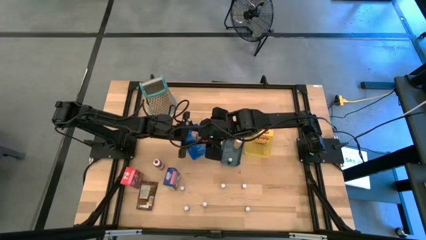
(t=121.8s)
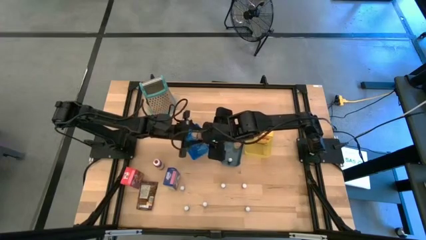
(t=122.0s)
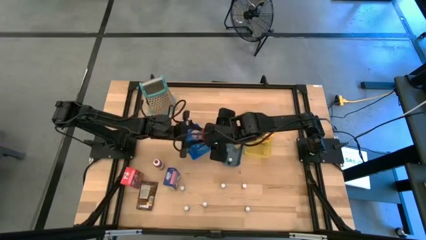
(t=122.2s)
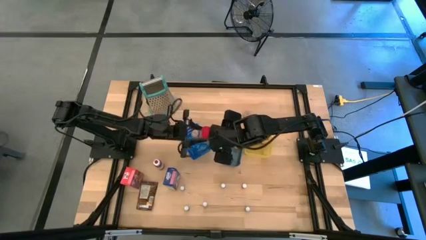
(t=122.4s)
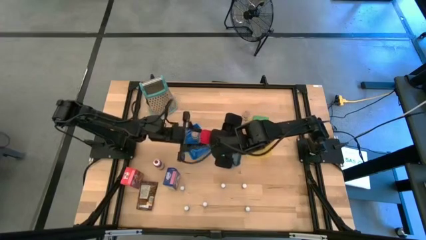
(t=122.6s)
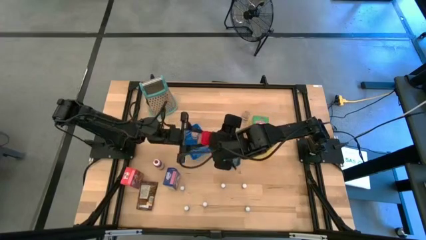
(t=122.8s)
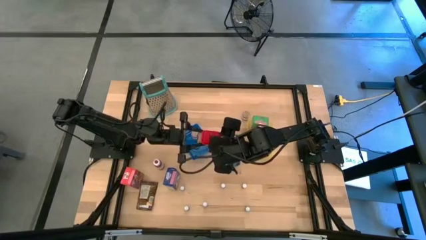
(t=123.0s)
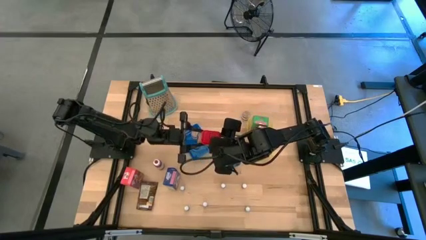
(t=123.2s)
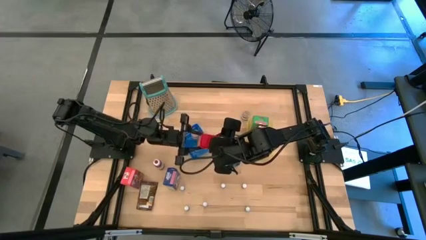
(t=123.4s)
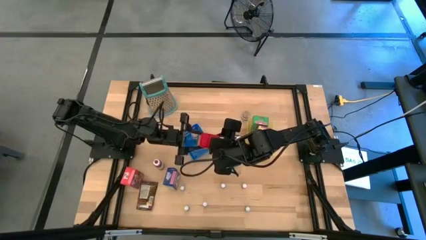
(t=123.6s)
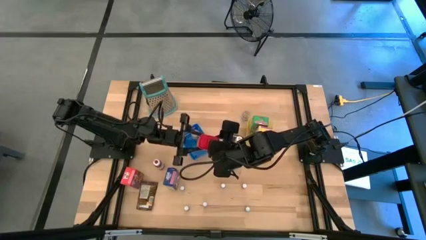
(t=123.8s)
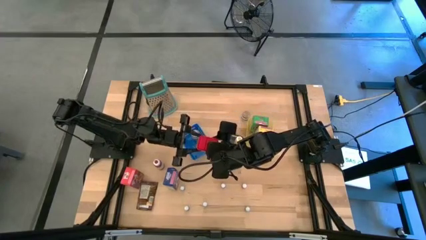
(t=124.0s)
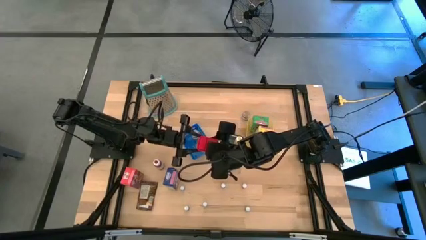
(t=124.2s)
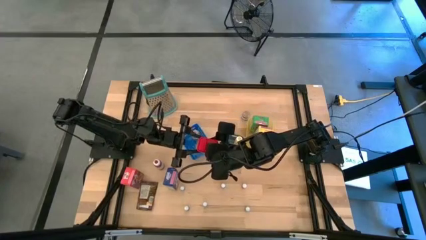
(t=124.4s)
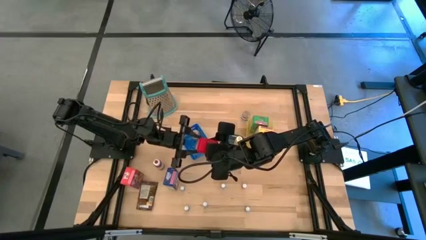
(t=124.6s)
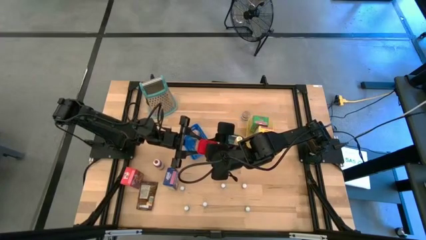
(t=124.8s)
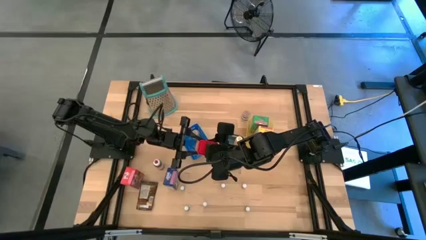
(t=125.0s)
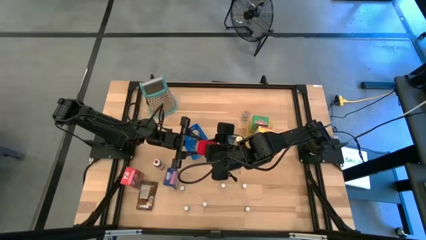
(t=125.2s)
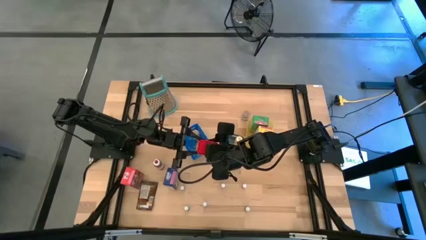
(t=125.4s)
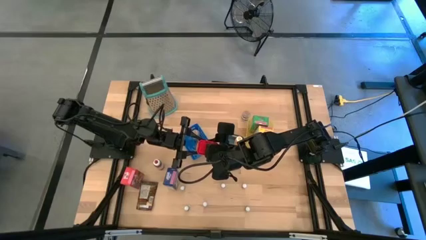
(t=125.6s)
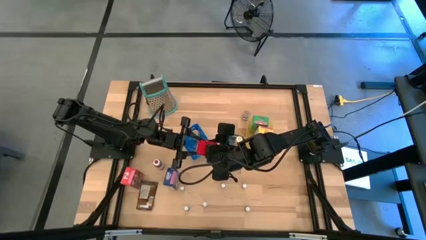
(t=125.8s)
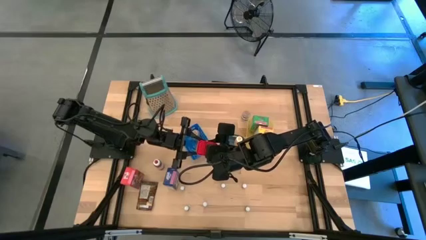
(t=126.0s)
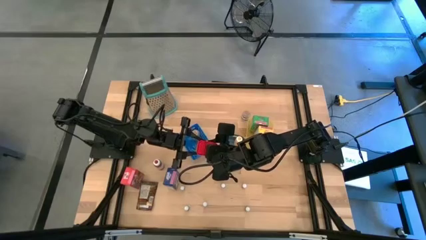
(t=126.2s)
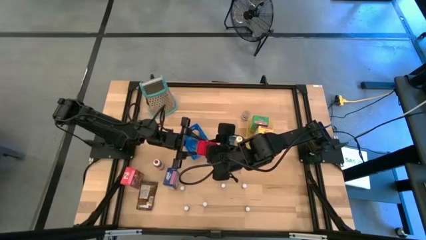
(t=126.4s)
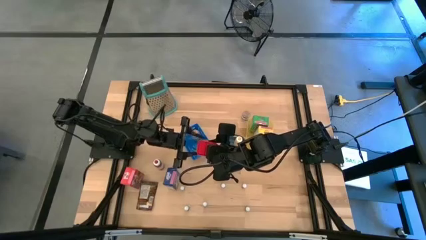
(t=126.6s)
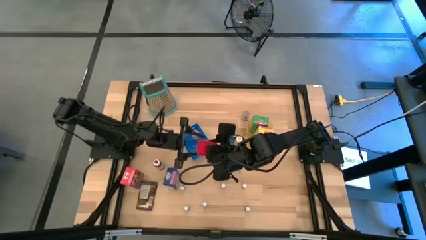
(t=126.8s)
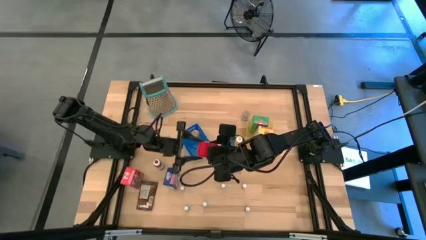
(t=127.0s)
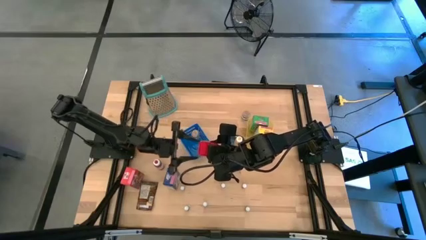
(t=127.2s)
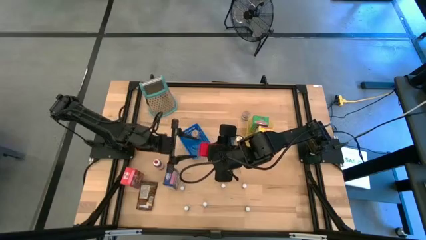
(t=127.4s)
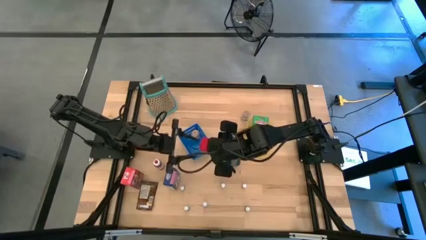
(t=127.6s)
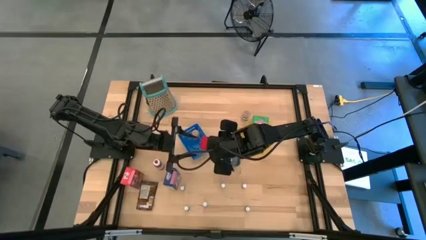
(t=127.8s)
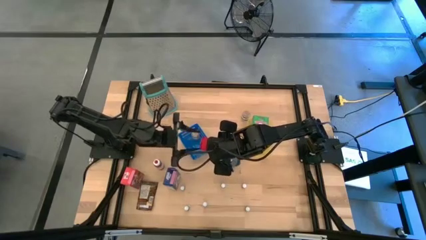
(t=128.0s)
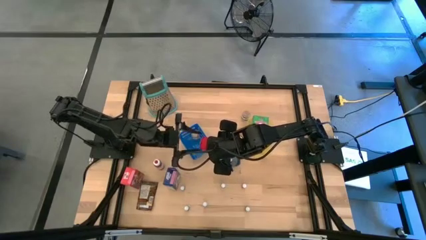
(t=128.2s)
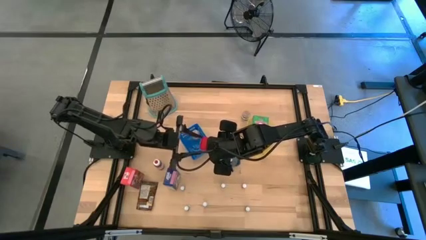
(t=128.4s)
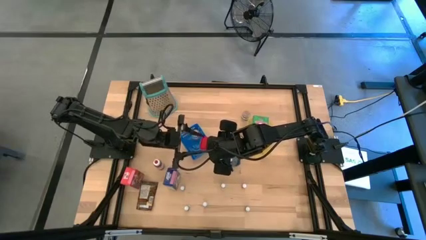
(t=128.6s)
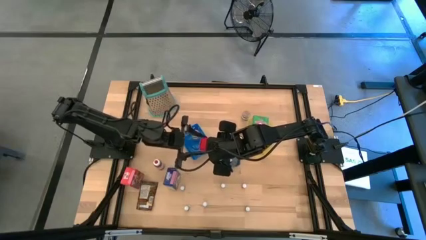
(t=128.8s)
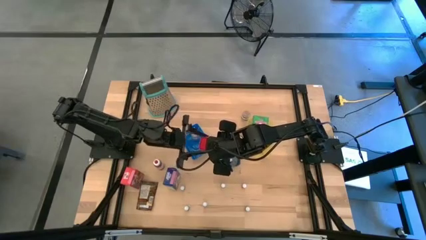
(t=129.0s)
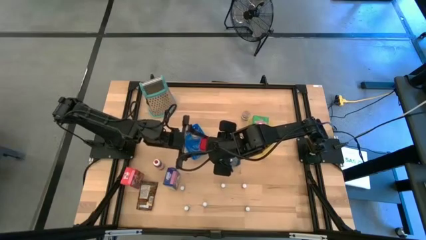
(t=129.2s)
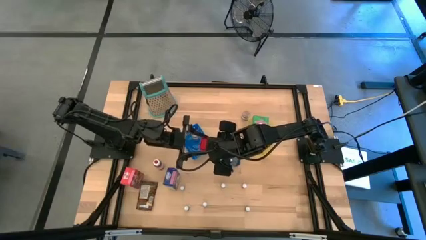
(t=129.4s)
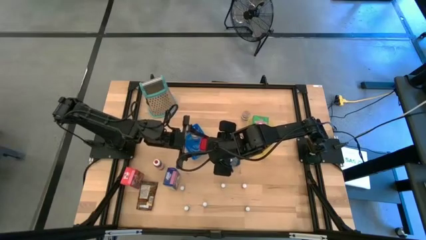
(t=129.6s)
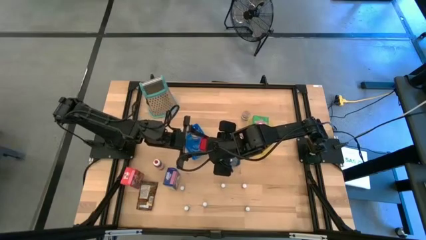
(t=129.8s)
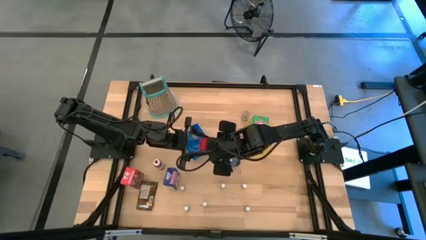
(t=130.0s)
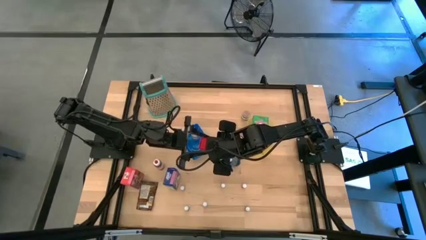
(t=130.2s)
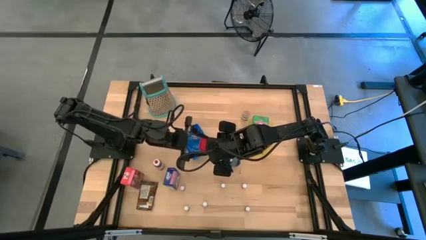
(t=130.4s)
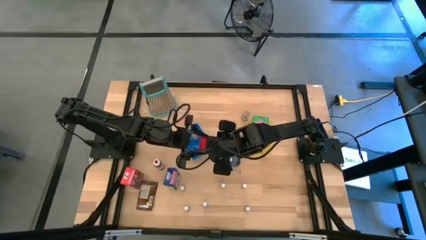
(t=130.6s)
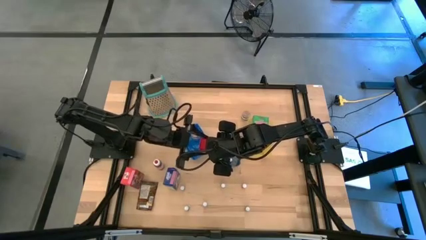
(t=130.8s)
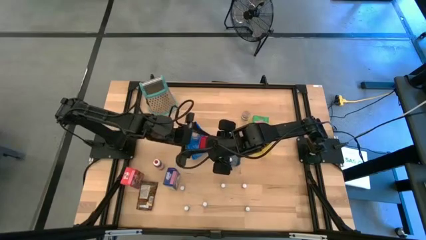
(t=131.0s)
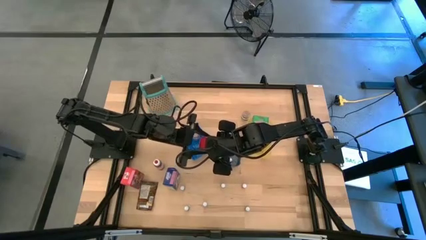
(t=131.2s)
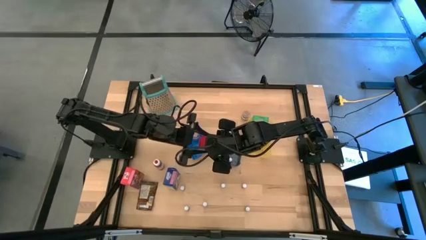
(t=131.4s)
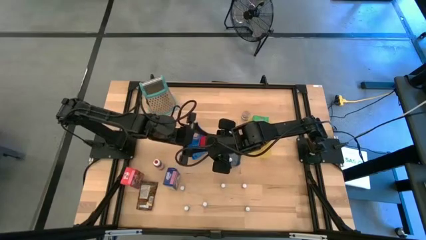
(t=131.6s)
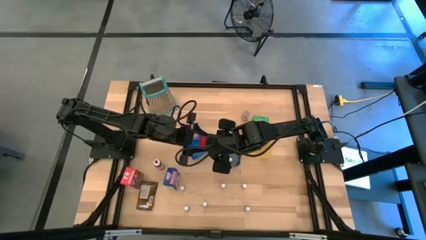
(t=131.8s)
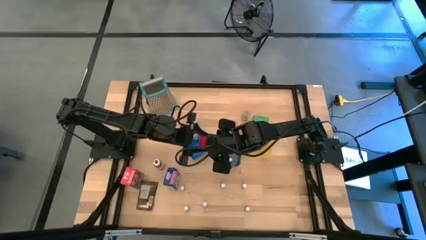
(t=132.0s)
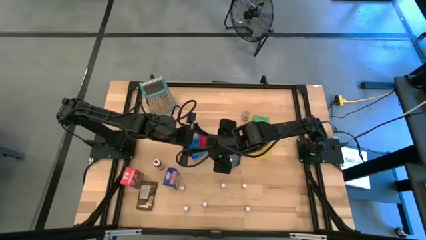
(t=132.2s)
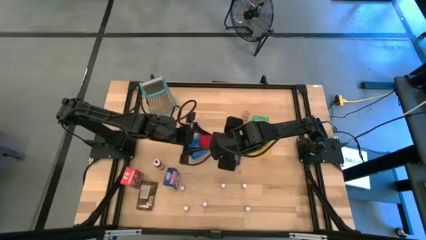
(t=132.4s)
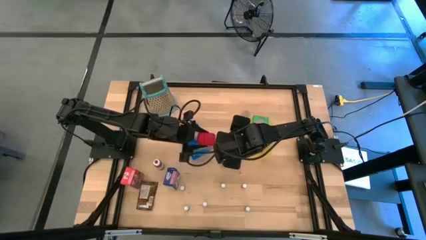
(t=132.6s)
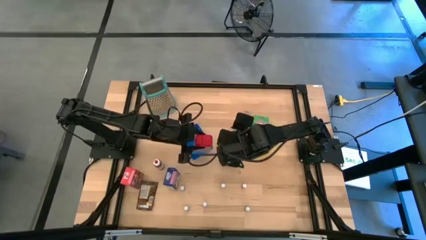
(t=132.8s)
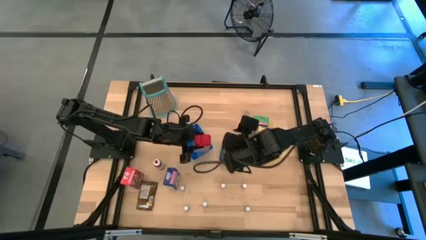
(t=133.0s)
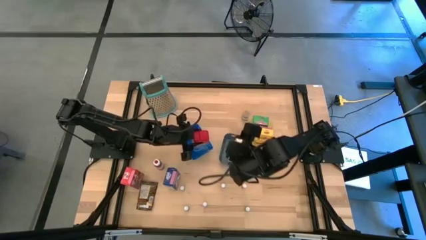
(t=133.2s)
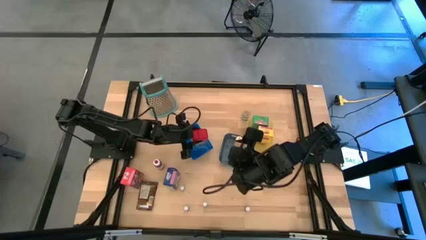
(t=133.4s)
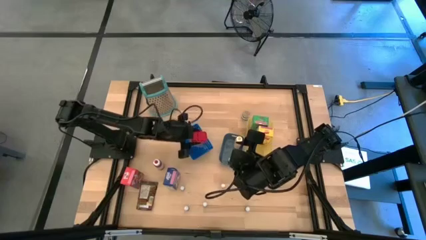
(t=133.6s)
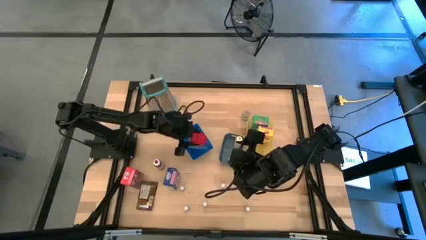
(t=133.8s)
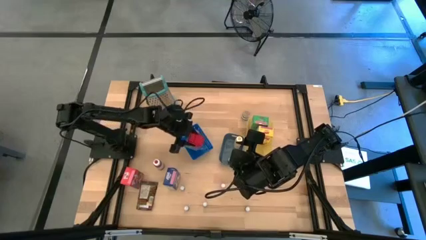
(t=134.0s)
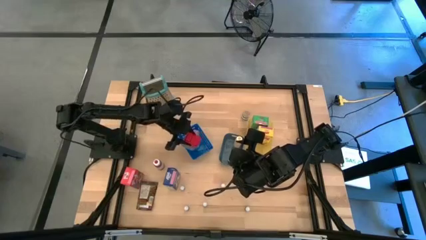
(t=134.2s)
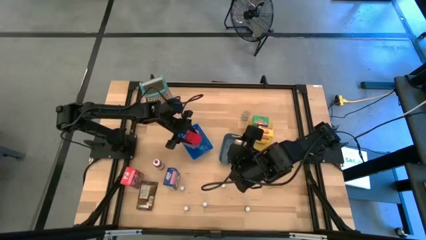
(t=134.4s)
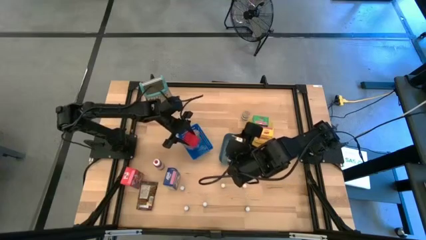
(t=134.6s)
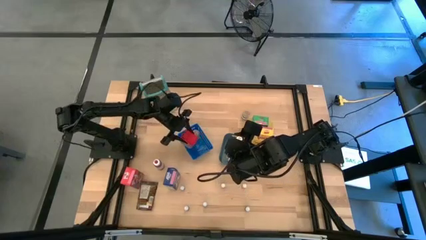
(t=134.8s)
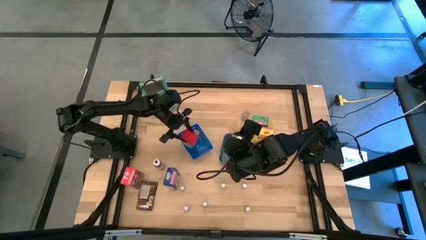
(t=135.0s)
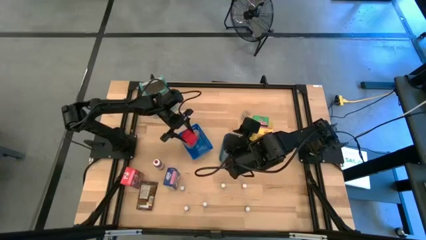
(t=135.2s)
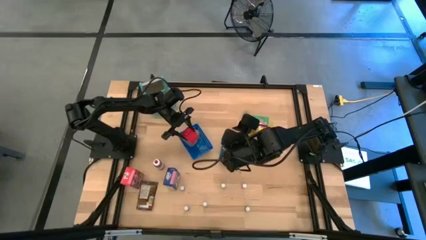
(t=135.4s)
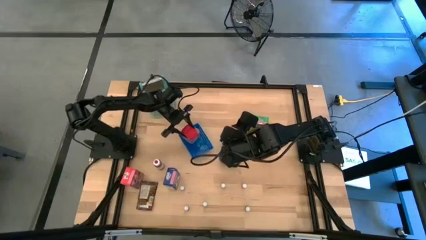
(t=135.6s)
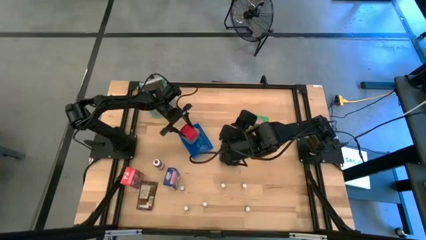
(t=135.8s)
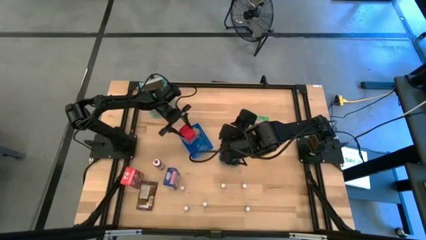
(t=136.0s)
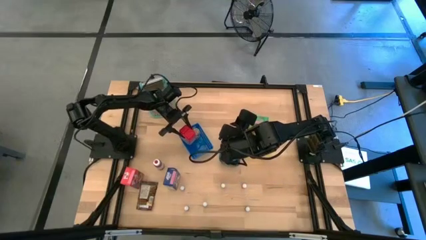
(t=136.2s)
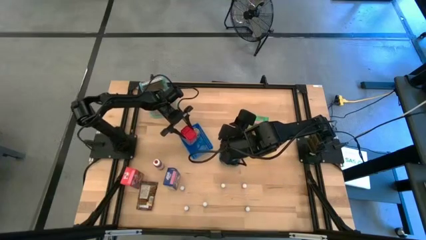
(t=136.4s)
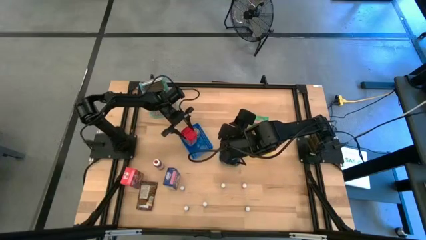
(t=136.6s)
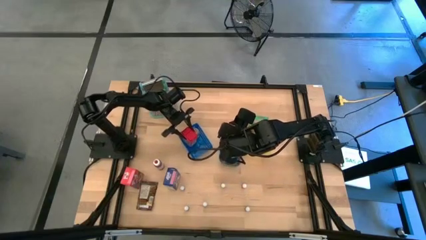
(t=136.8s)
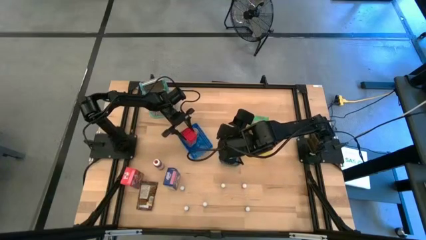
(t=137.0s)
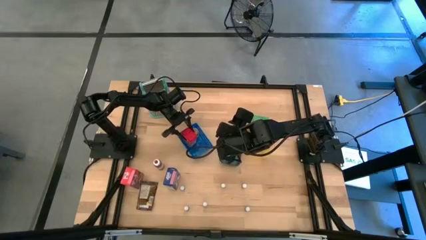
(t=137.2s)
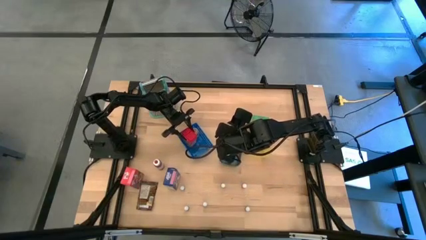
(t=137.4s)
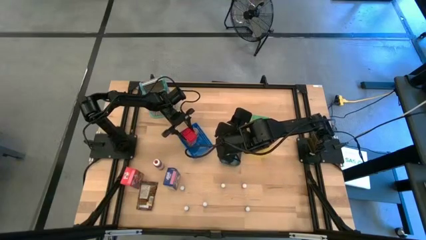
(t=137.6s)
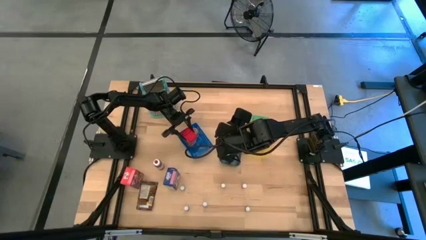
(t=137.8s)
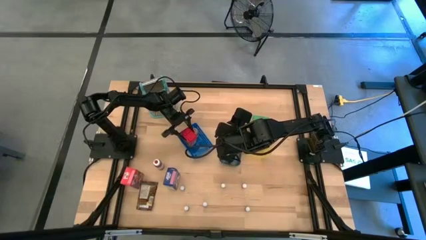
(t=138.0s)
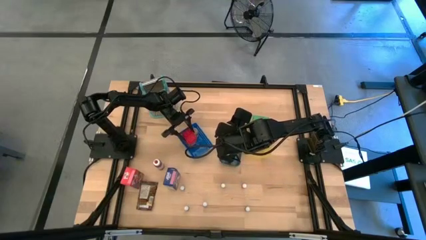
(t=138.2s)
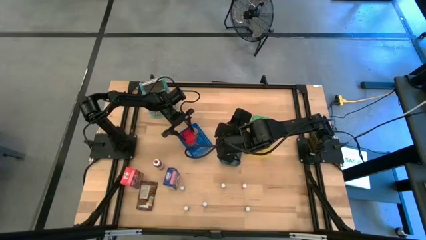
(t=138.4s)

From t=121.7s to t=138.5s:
Task: Pick & Place Kitchen Items
Put the red seasoning can into the blue bin
